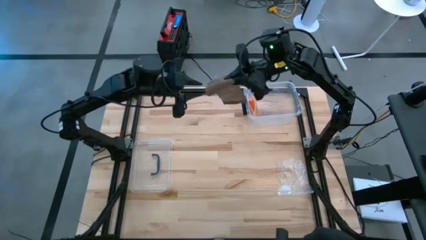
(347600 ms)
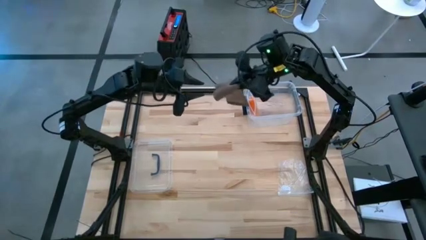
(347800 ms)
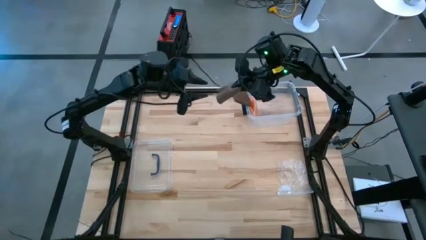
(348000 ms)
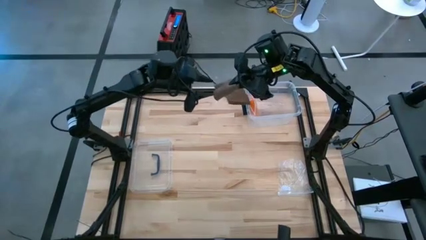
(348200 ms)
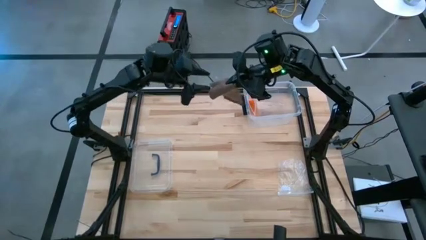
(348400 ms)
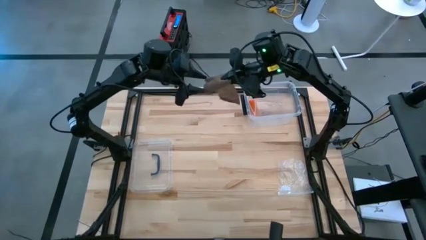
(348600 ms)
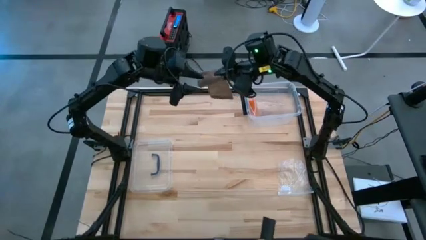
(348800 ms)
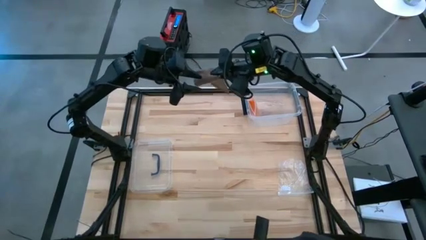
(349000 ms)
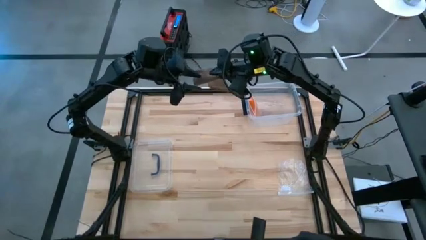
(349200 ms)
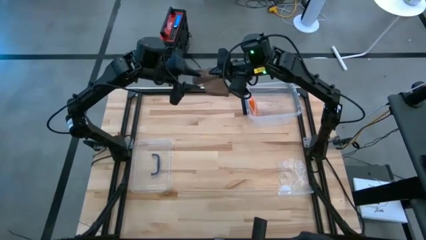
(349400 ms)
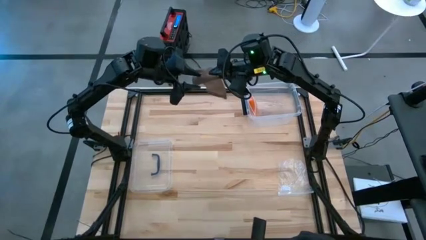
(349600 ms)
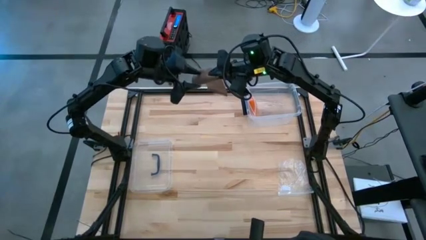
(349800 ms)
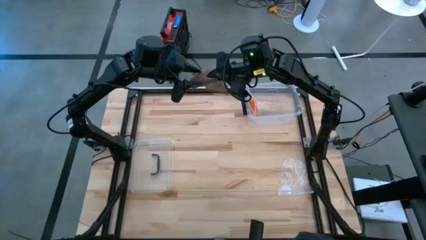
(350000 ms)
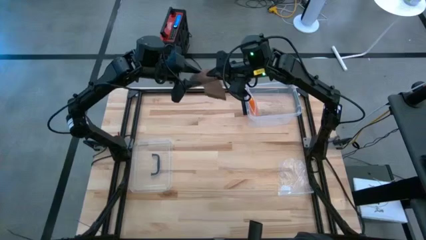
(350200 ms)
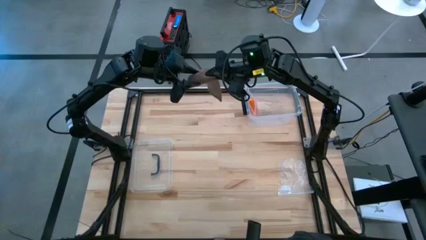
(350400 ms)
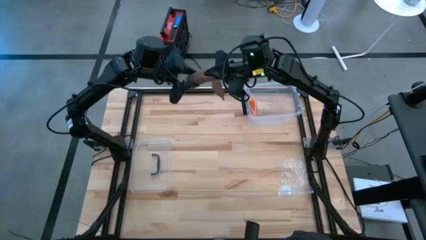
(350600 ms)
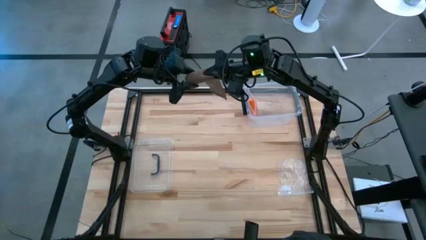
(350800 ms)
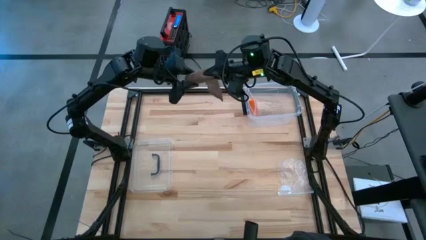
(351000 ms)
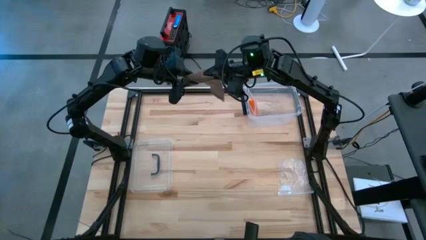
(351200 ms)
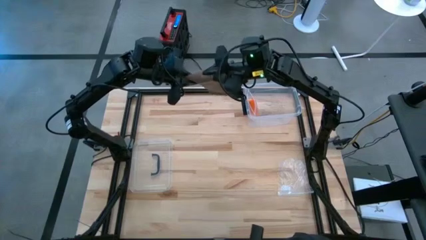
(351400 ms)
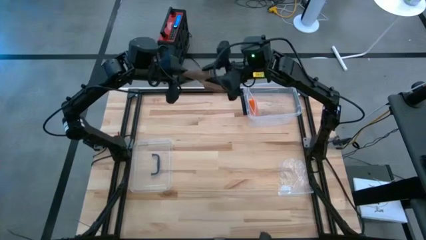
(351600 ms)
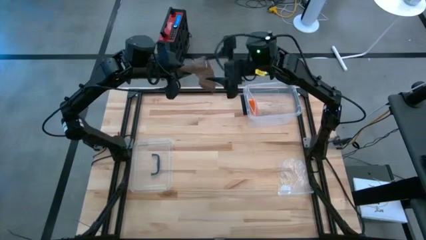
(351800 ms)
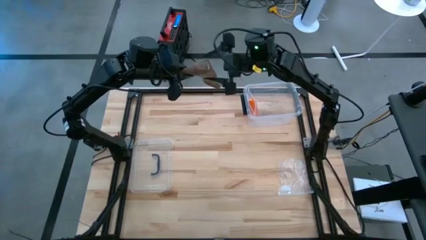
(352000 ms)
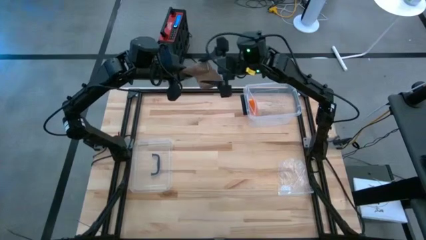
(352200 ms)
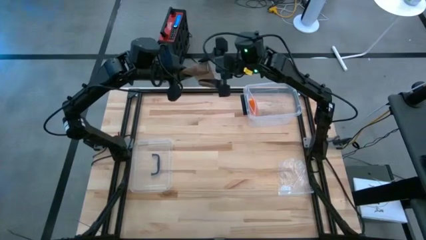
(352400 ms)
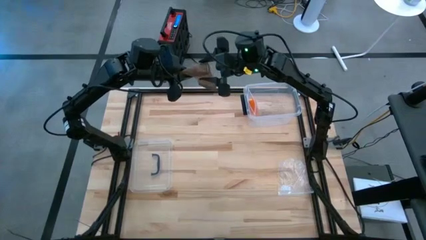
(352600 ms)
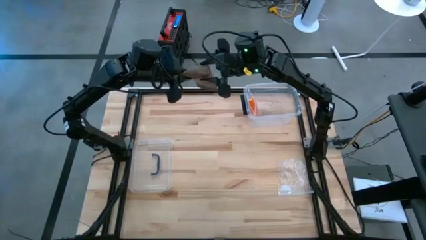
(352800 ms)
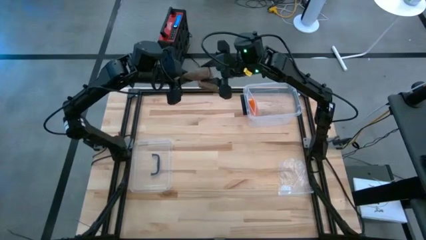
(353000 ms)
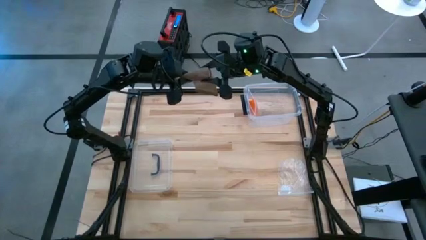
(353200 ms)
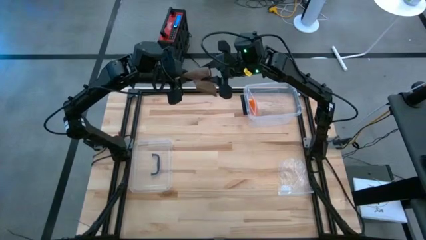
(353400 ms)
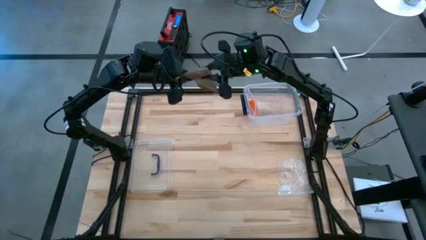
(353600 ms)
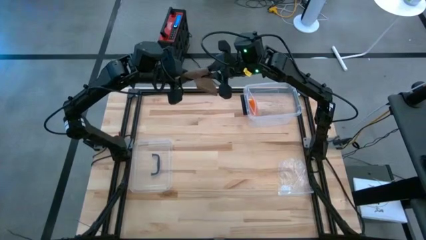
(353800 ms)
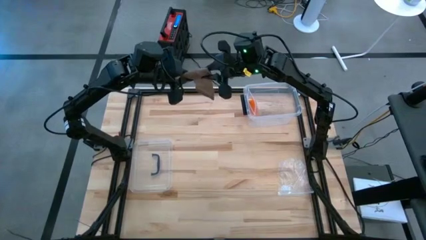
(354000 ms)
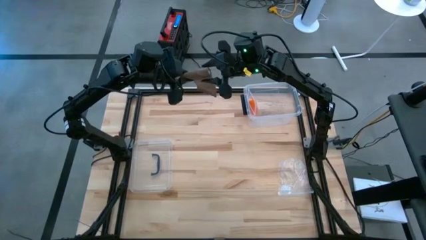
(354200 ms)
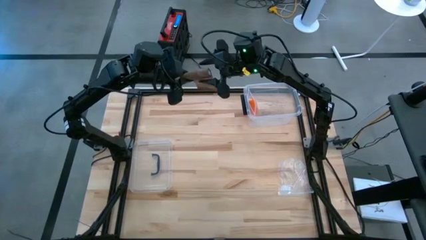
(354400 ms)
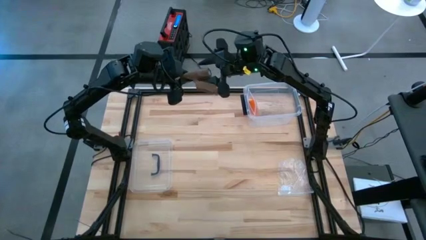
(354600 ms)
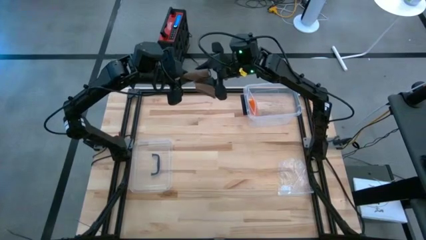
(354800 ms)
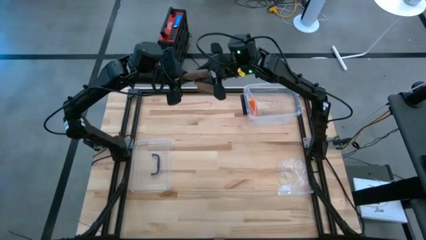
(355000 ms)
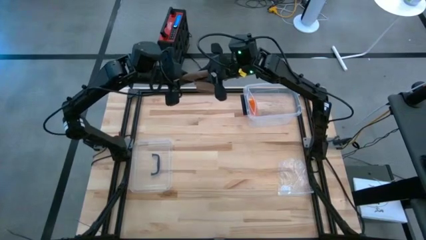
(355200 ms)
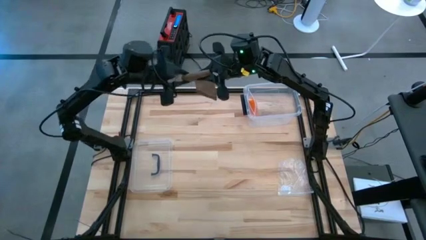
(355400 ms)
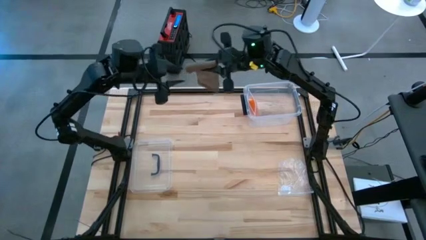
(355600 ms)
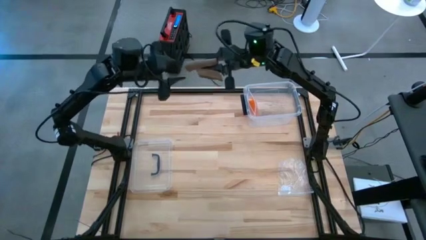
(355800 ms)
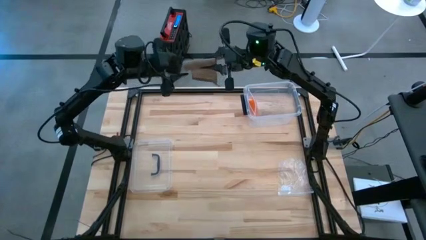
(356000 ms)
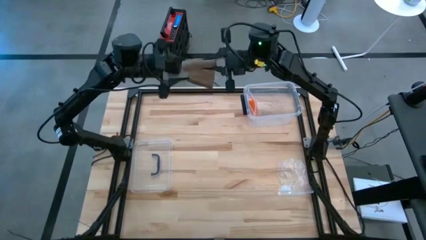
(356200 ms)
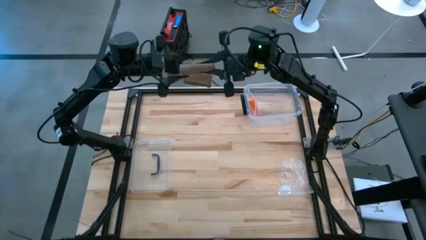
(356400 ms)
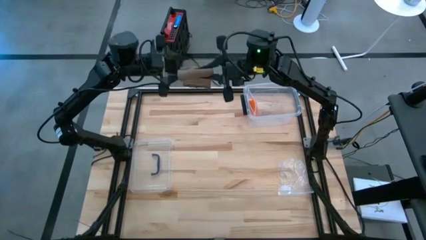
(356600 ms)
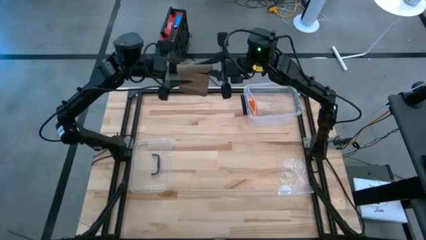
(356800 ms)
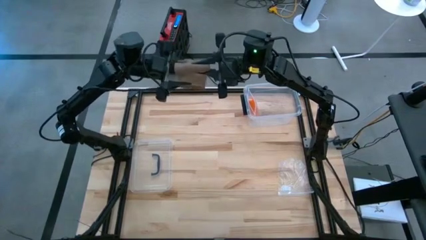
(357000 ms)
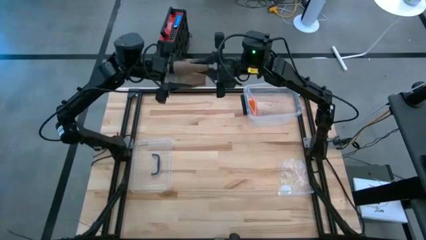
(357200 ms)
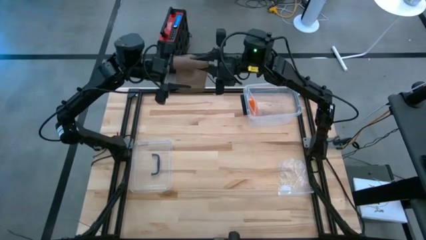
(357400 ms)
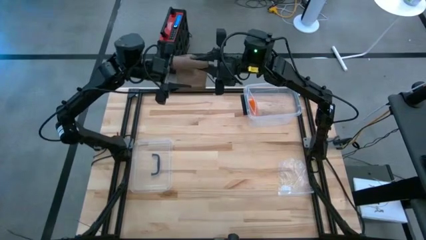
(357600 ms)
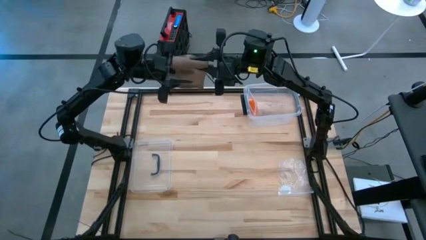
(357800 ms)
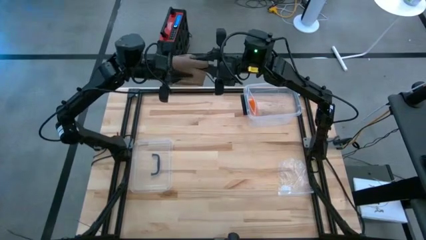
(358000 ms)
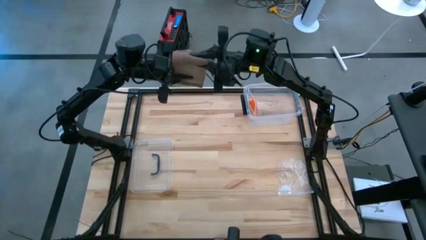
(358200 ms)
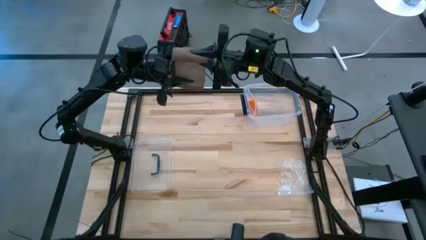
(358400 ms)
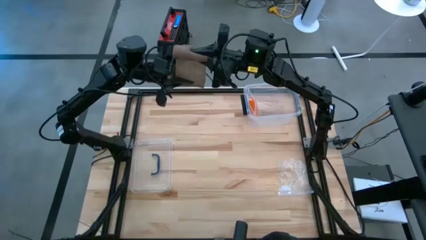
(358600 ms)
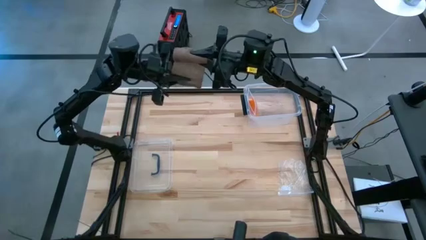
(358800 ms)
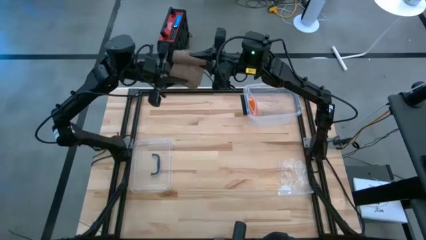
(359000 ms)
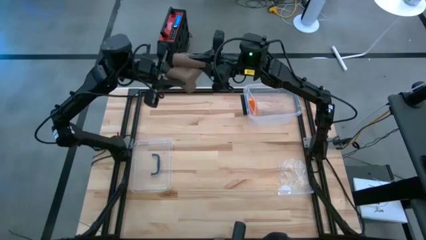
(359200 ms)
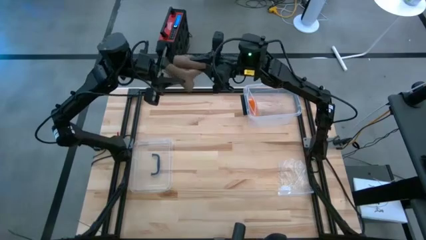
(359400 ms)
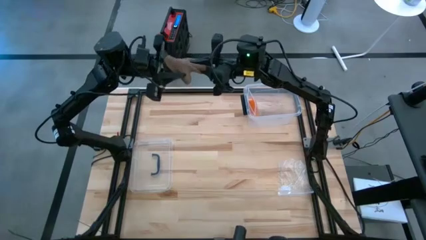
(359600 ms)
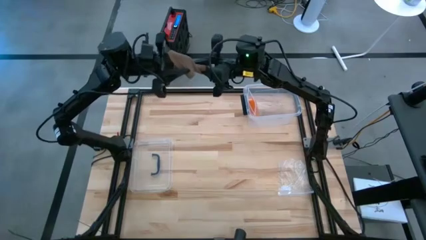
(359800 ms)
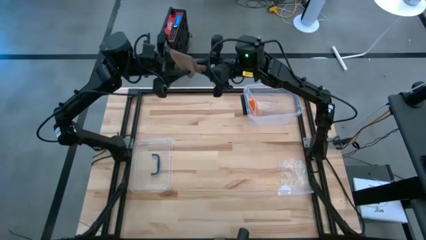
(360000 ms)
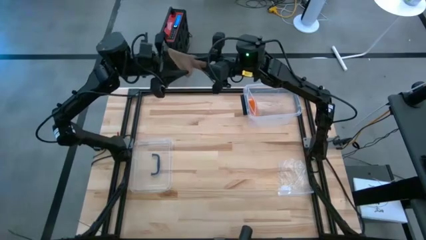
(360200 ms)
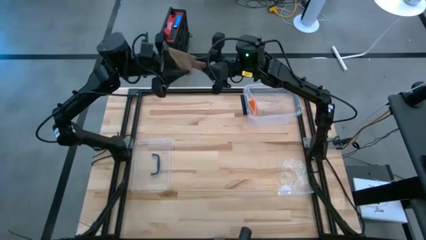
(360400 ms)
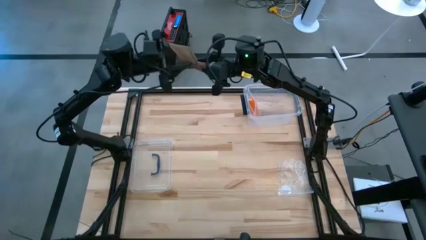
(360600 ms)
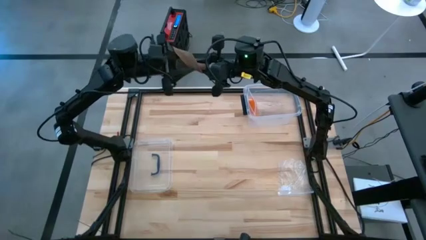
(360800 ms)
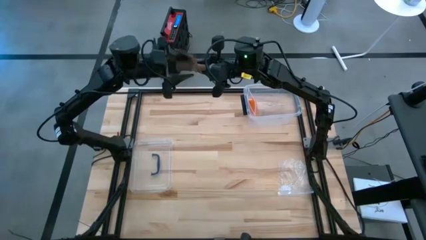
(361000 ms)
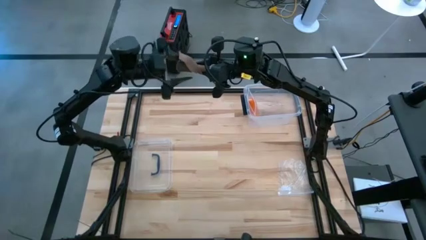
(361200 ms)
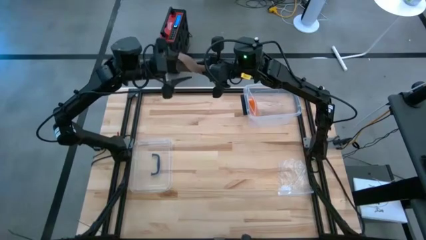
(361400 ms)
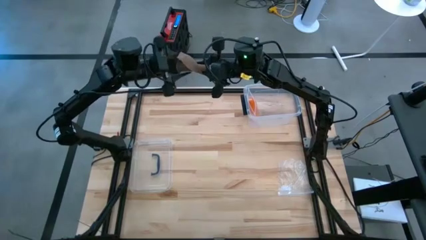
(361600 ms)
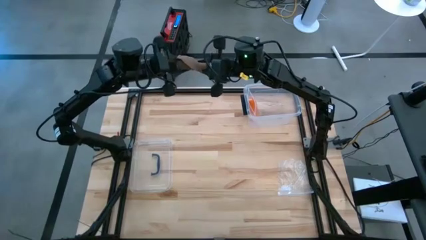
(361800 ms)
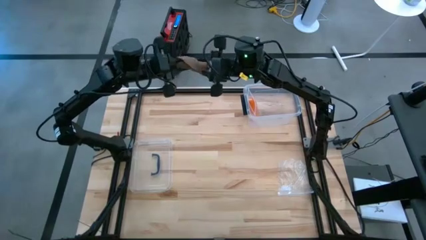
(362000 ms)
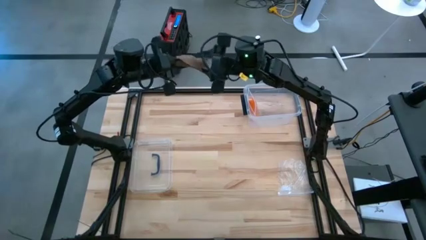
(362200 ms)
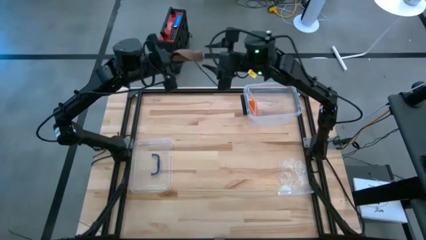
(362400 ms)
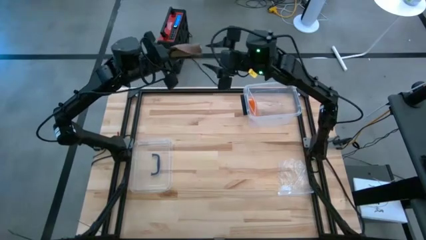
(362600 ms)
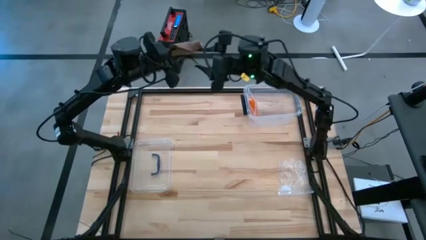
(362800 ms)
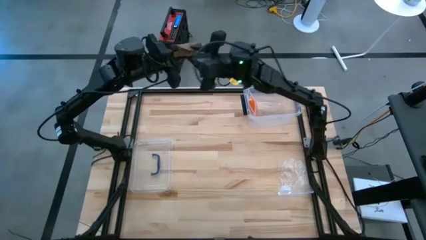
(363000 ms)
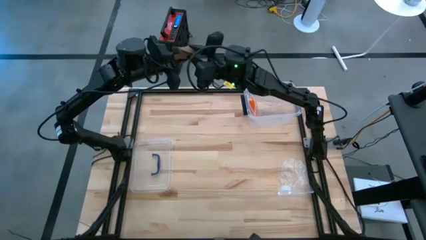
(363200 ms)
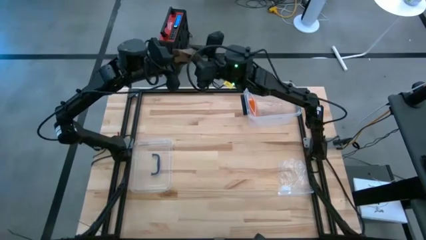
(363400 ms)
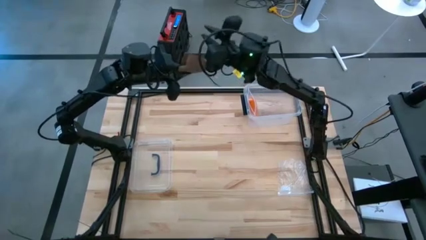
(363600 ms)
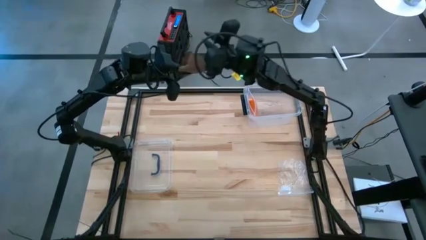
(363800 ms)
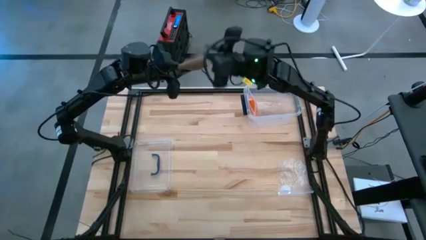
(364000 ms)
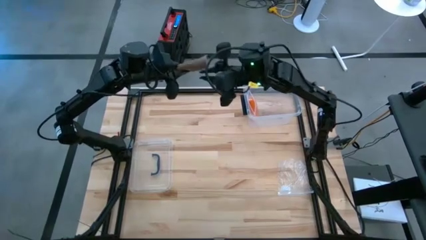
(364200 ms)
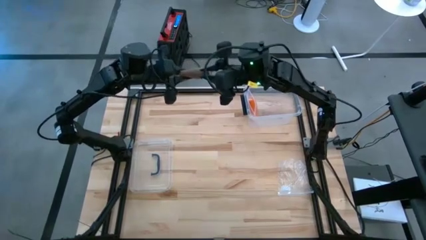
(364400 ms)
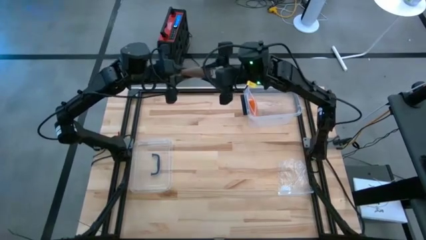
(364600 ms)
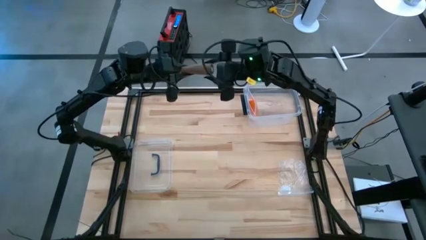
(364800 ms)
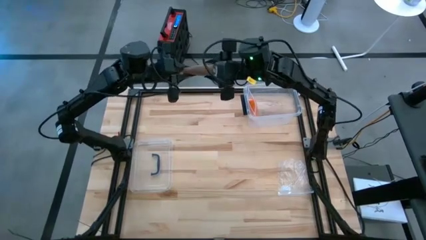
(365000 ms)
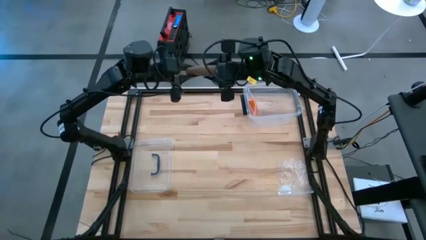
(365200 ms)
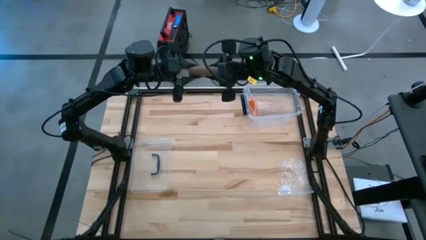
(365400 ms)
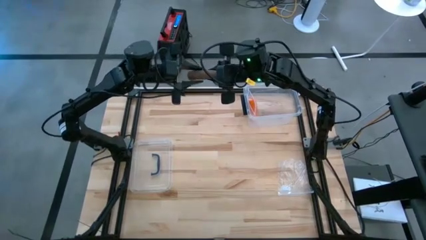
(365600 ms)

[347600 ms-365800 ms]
Task: Roll bandage
Roll the brown bandage
